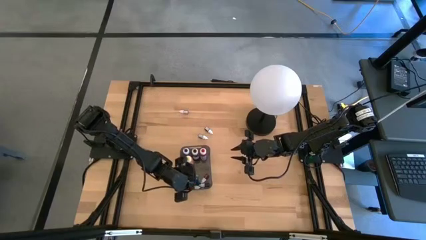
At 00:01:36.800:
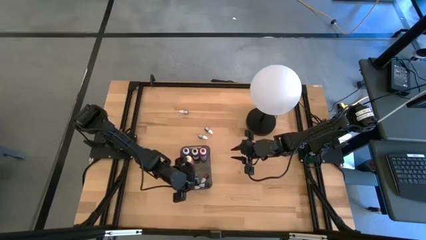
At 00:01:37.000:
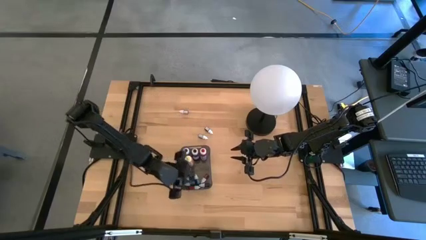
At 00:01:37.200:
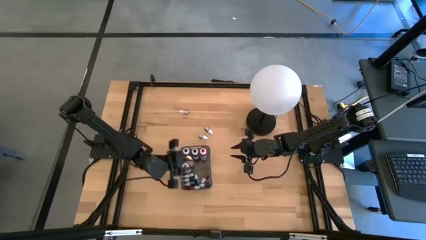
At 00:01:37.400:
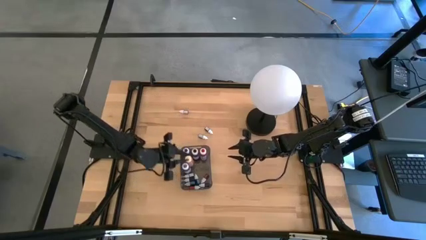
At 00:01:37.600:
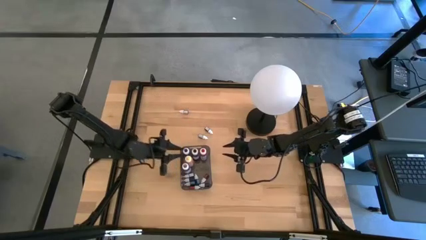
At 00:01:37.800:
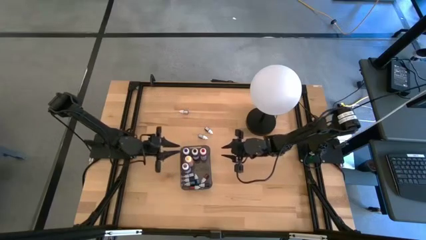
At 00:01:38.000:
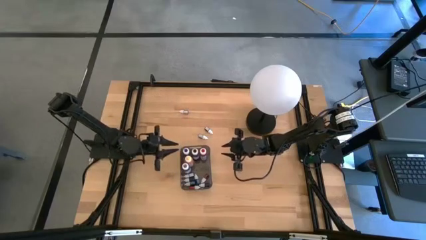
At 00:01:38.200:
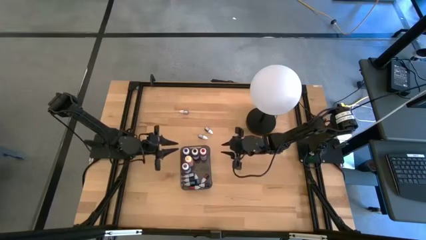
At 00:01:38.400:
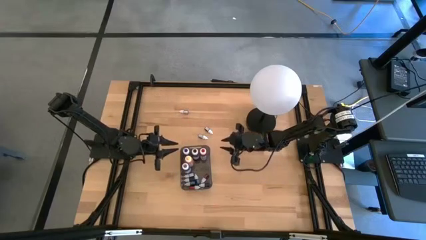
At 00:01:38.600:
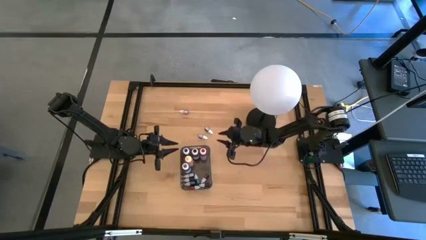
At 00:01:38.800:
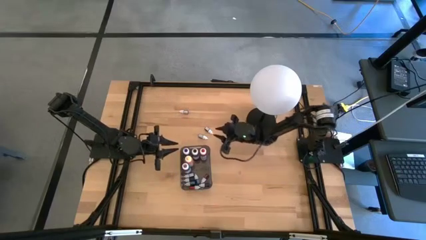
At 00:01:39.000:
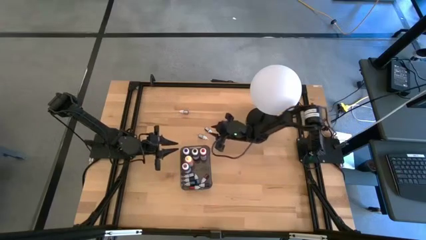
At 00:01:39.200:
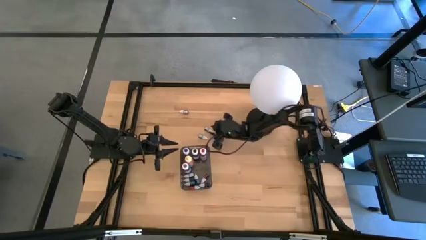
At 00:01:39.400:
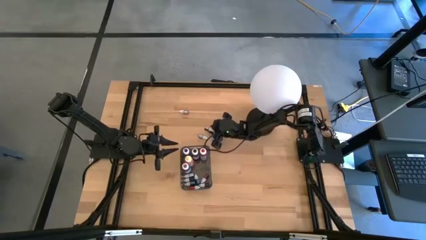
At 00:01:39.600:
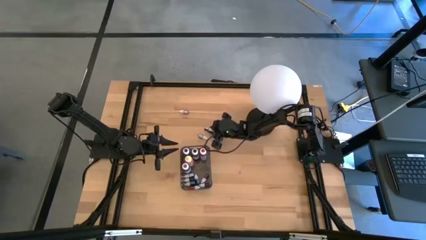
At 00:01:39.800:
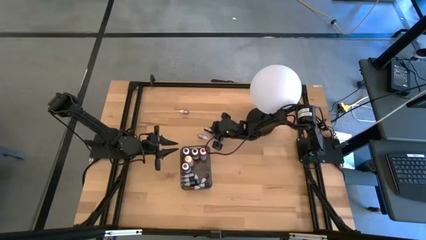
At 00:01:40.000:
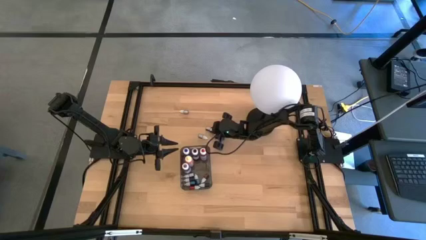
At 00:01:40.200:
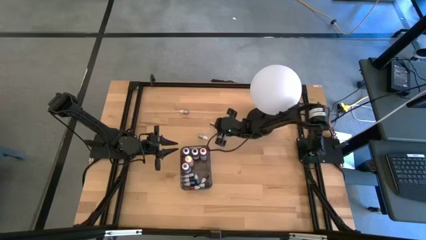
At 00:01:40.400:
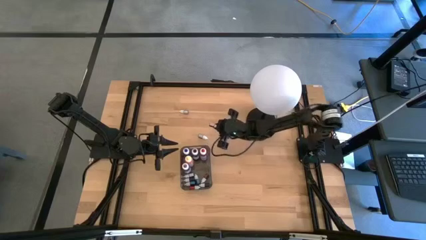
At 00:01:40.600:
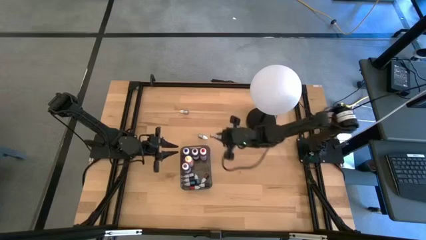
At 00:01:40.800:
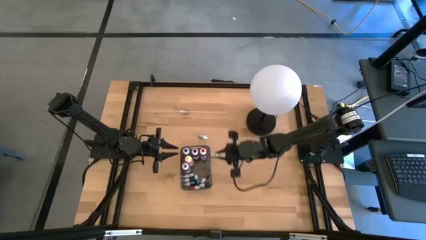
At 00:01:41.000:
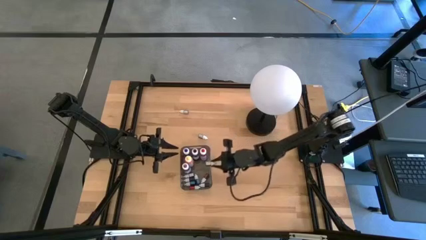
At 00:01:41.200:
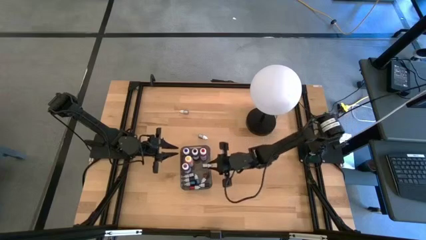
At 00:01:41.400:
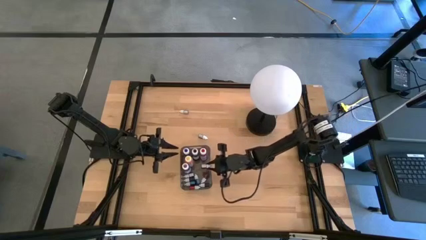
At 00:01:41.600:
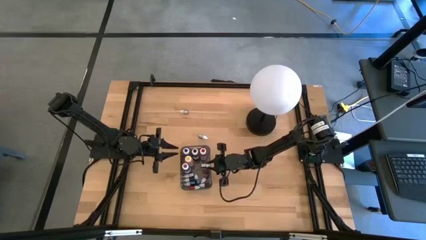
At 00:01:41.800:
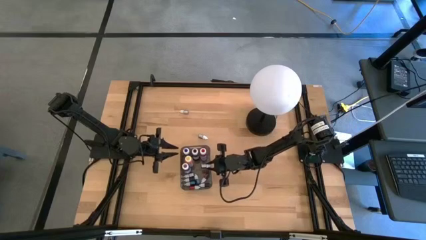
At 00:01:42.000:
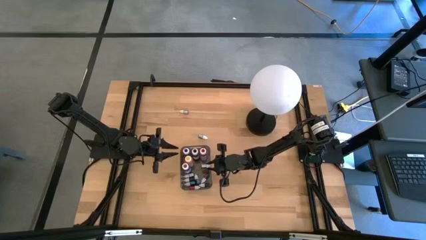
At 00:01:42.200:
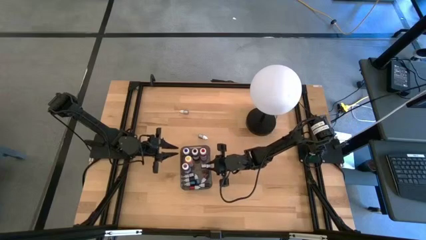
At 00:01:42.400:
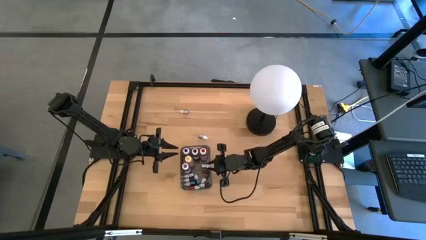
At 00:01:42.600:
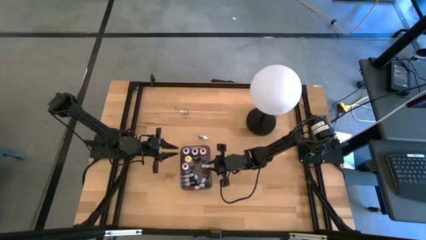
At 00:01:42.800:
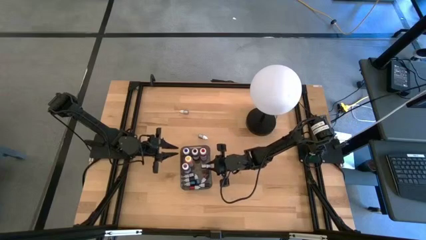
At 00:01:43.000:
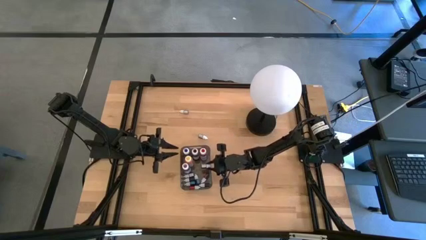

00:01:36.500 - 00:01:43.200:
Task: Pick & Place food coloring
Put the small black food coloring bottle into the black bin

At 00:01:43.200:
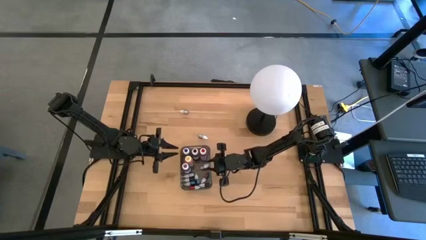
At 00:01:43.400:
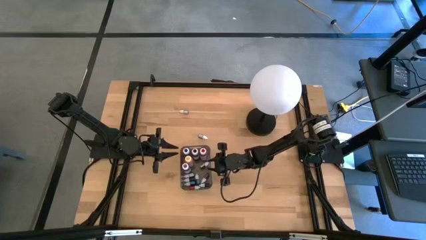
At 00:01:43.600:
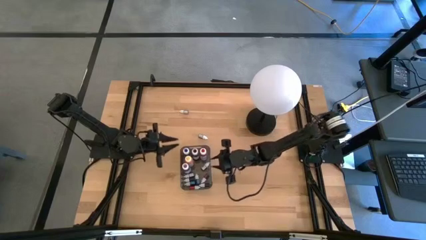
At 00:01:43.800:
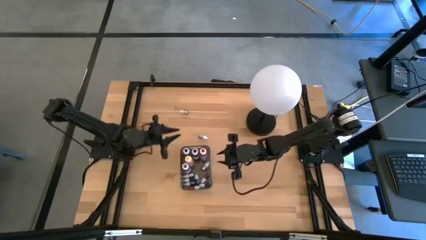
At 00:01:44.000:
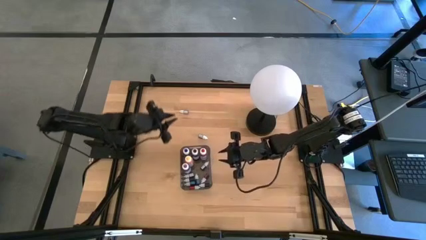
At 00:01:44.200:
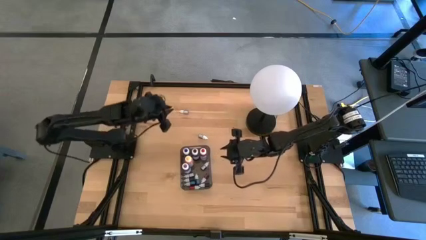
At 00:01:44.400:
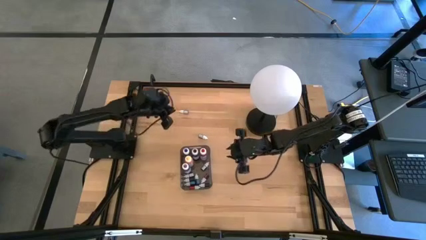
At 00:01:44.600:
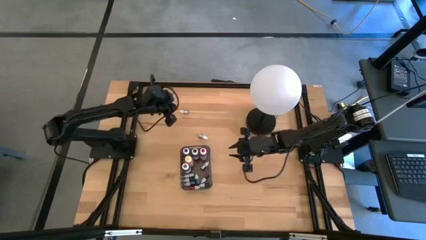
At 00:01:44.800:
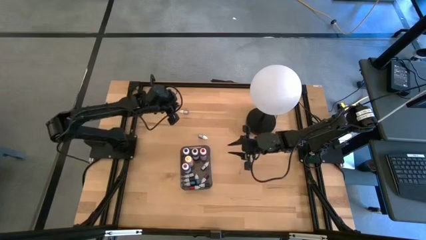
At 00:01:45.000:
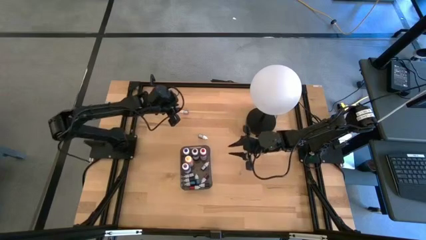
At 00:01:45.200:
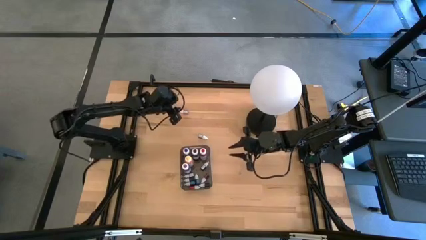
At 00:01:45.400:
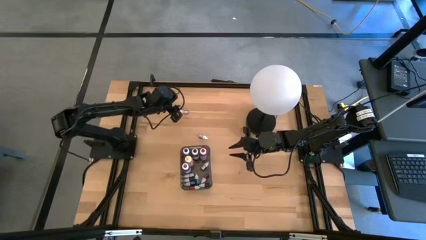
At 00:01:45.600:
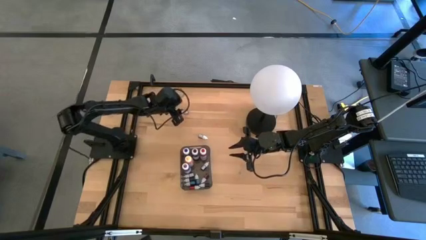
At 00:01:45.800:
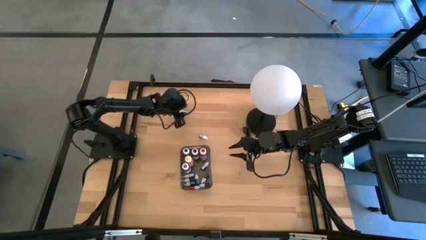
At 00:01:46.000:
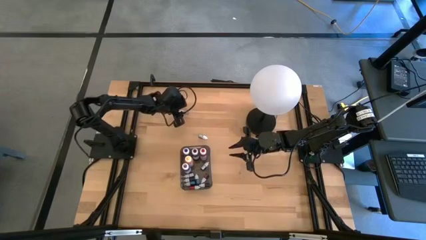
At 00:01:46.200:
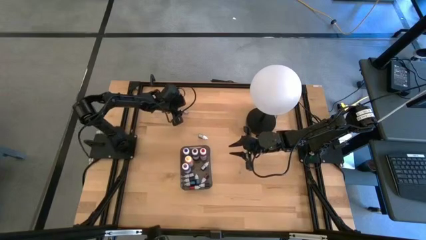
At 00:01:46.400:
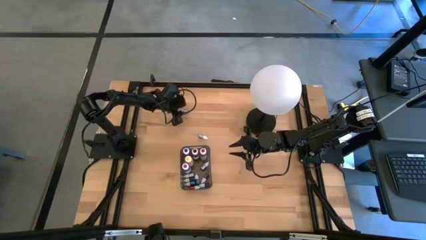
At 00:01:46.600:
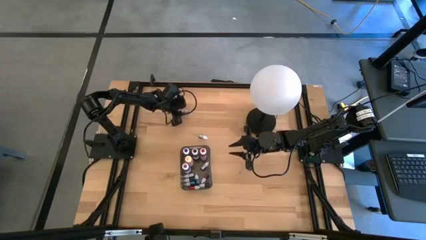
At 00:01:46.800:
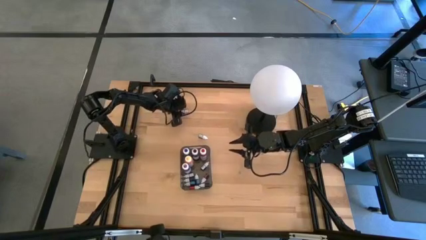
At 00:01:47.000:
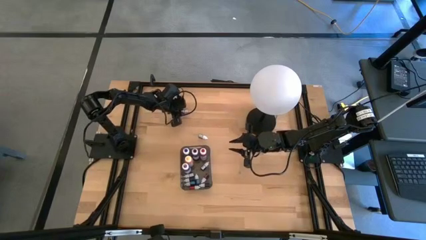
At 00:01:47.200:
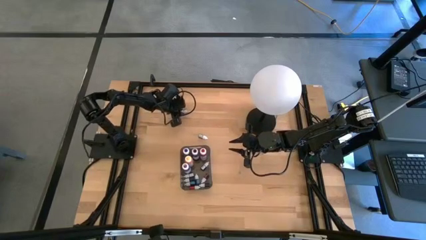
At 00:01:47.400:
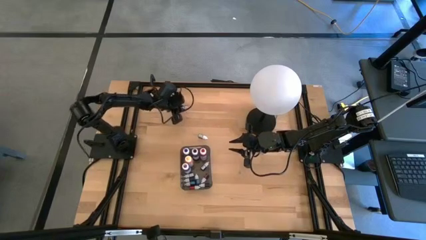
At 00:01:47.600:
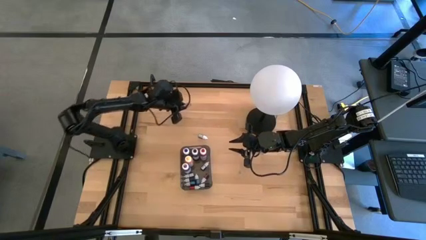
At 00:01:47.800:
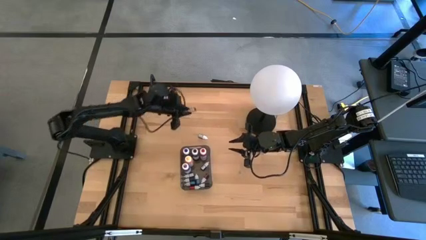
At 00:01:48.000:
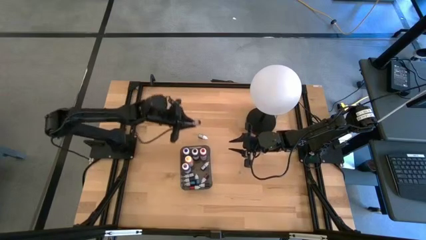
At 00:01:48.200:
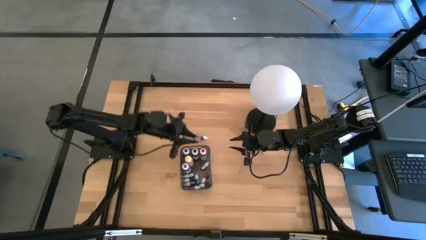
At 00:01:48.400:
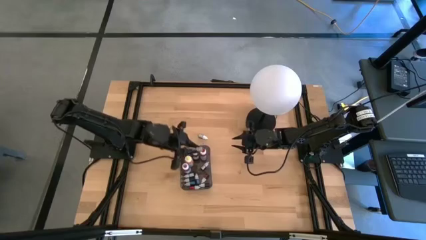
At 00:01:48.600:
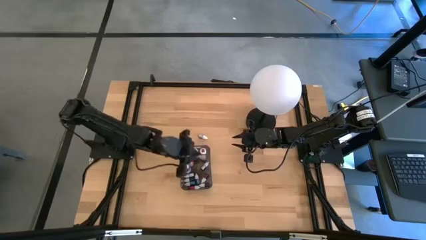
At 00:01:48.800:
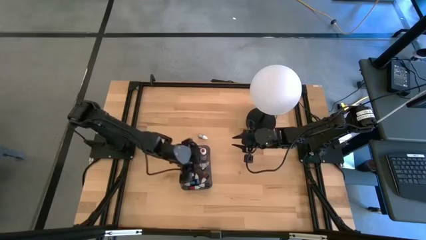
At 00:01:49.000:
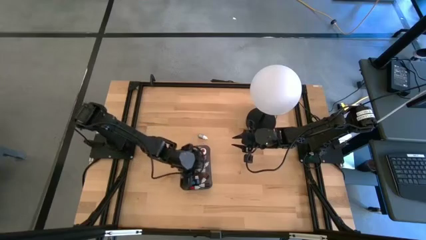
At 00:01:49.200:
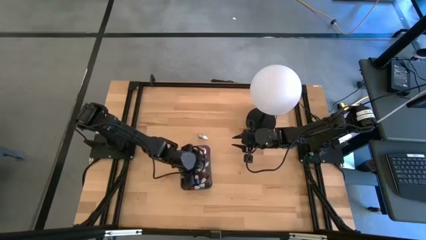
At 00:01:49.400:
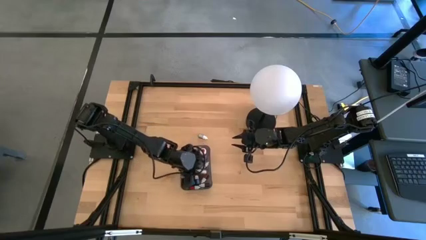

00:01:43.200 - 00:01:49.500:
Put the small red food coloring bottle into the black bin

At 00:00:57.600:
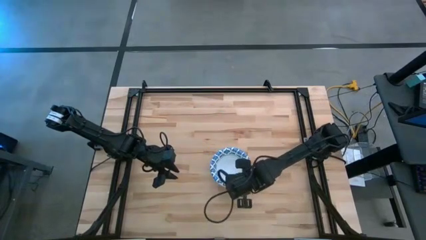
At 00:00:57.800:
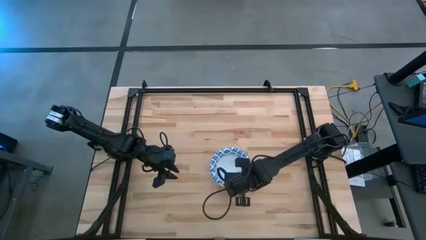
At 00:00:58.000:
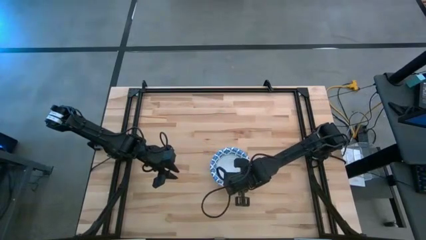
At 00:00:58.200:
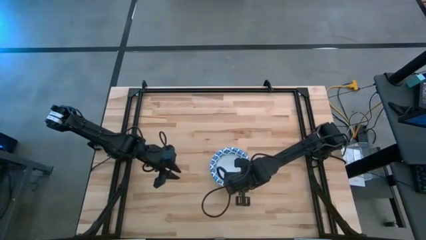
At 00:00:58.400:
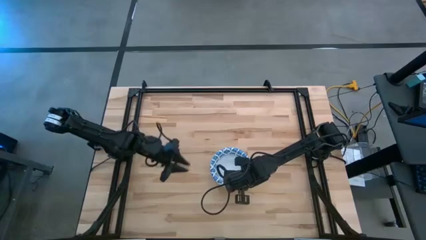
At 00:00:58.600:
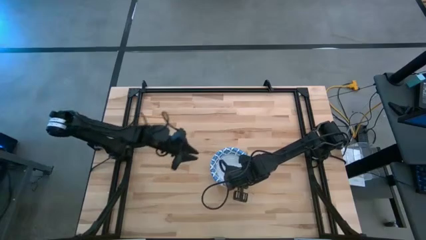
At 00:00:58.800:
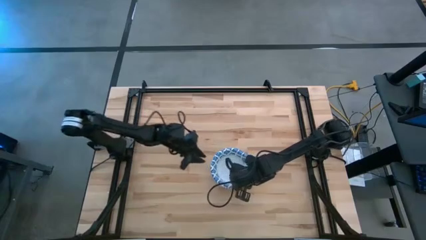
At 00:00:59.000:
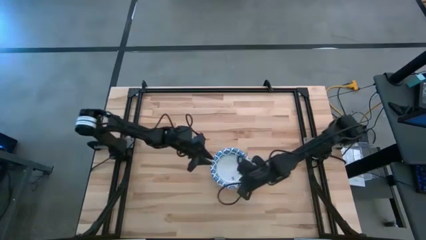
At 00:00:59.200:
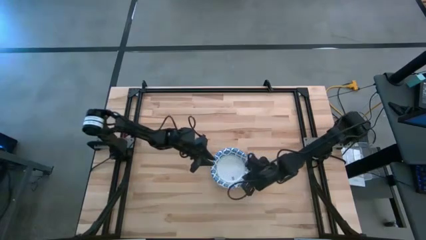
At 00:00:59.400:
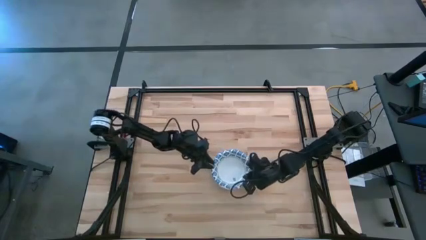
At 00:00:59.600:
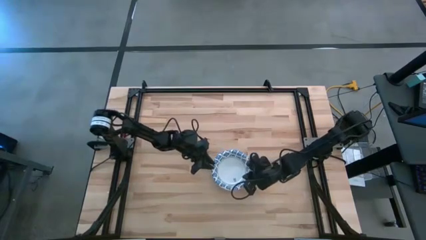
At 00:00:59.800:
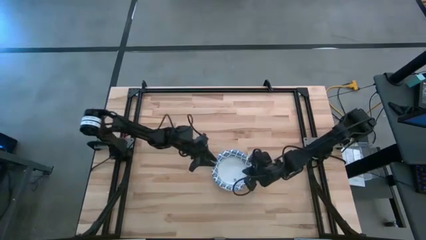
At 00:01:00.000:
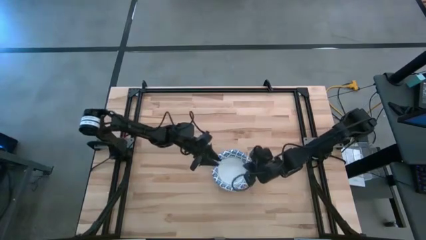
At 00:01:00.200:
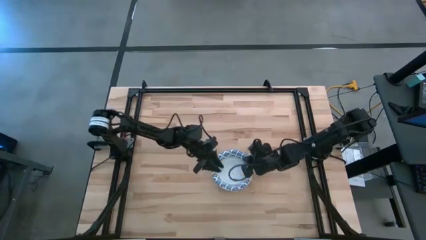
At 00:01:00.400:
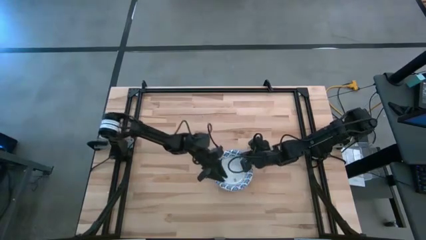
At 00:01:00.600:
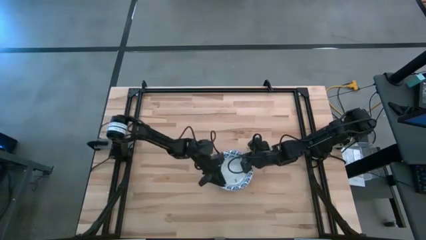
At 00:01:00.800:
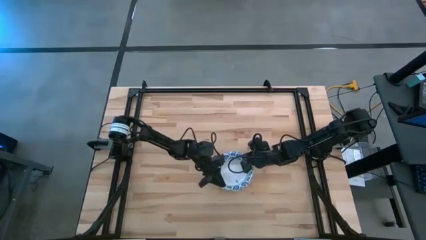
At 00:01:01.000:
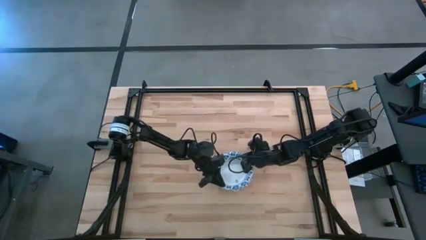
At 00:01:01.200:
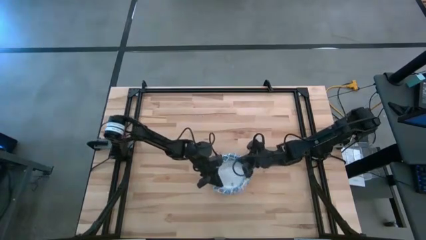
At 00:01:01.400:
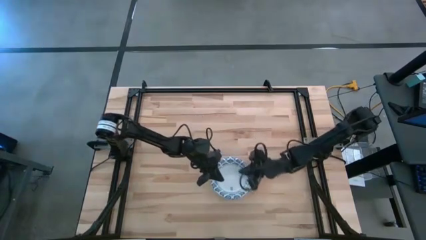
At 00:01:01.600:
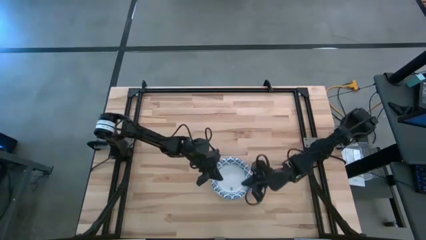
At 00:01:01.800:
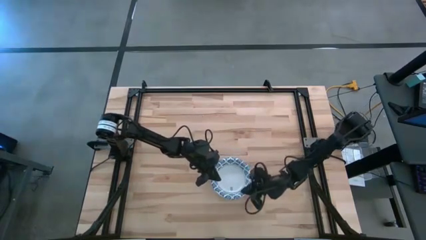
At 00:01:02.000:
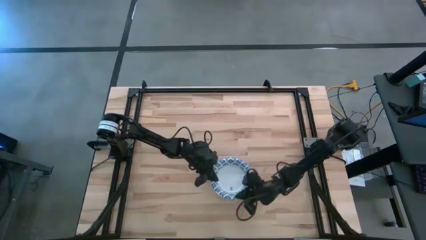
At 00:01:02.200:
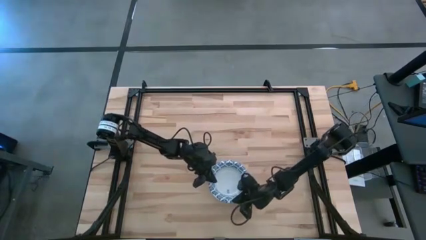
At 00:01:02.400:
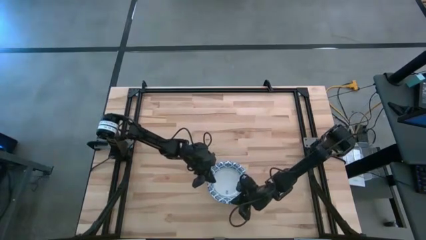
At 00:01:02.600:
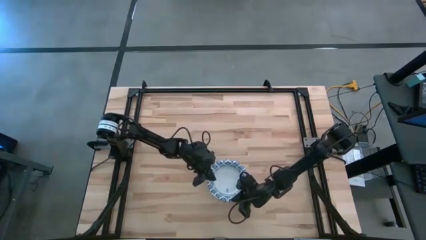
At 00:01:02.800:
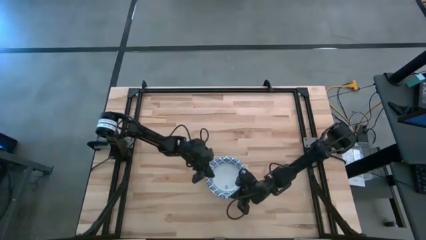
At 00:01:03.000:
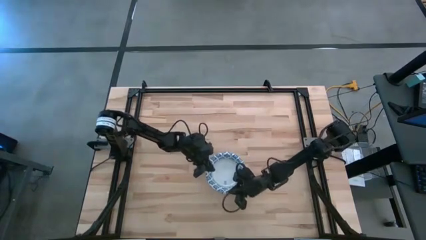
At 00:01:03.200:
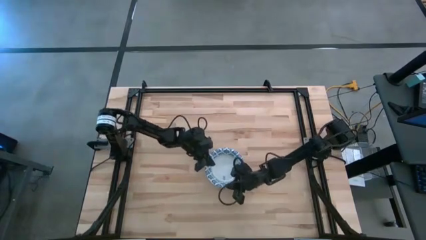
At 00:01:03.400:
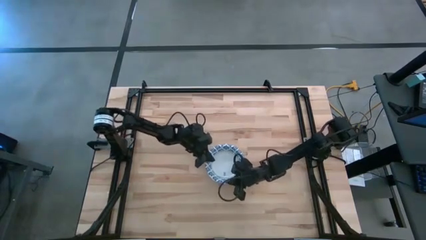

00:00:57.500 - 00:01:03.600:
Task: Nest bowls inside each other
Adjust the white patterned bowl on the table
